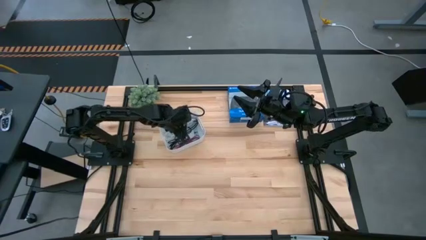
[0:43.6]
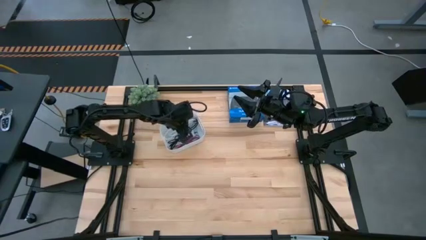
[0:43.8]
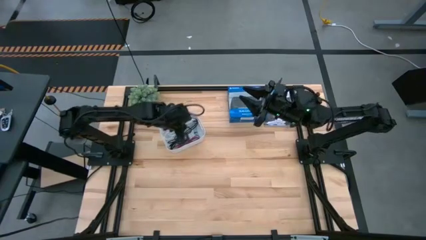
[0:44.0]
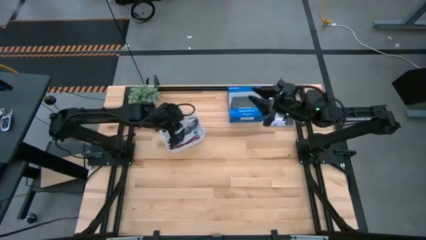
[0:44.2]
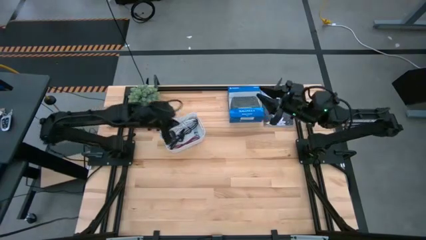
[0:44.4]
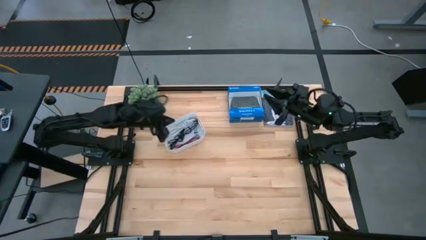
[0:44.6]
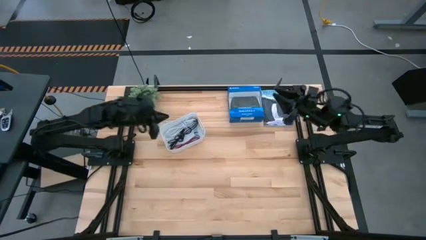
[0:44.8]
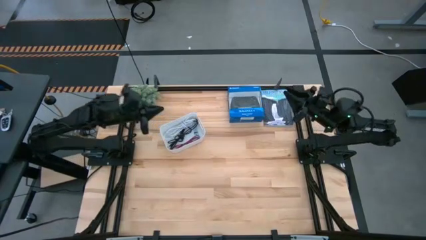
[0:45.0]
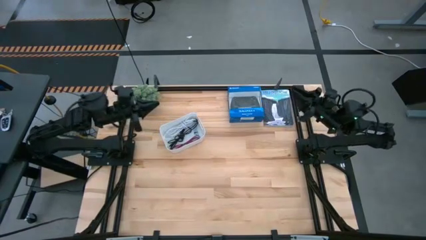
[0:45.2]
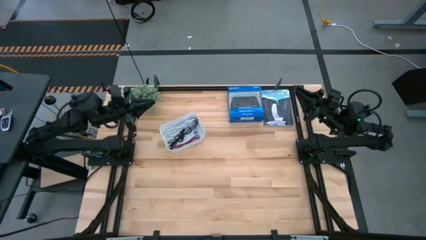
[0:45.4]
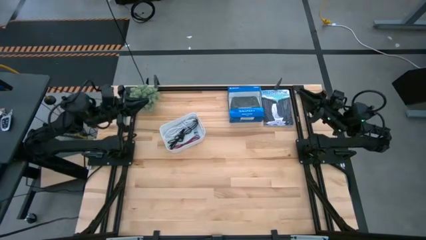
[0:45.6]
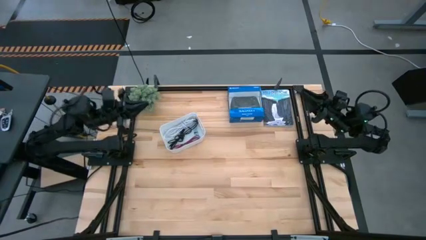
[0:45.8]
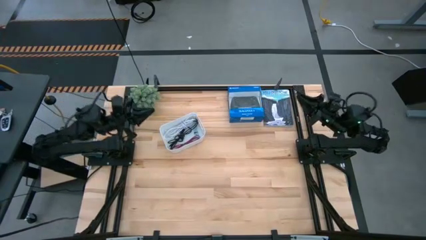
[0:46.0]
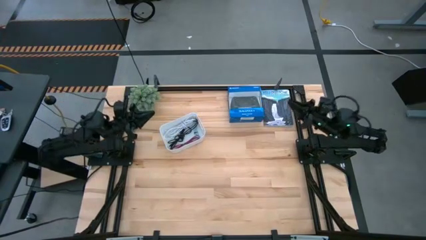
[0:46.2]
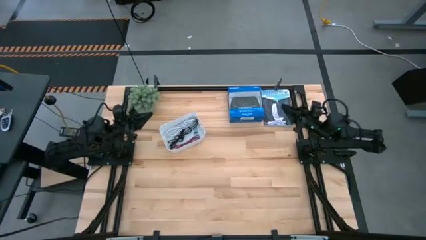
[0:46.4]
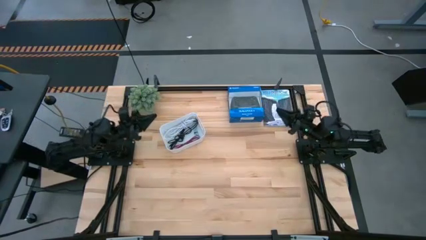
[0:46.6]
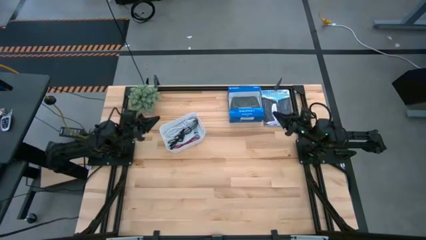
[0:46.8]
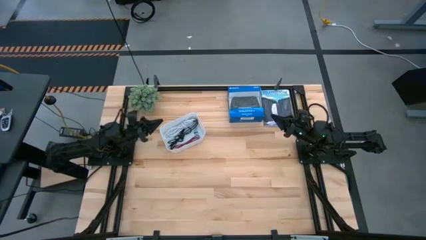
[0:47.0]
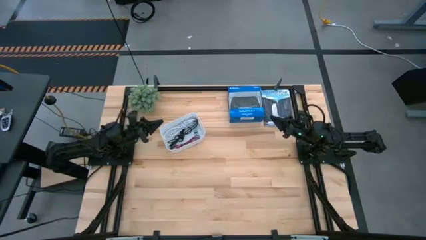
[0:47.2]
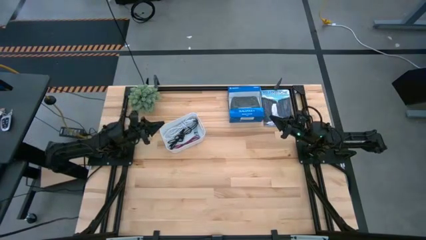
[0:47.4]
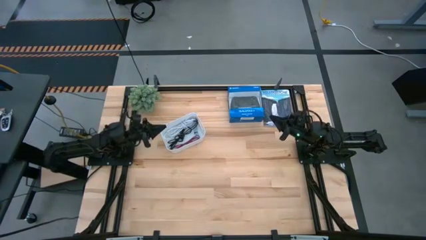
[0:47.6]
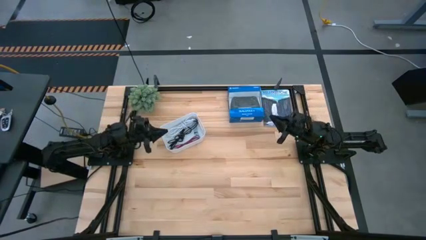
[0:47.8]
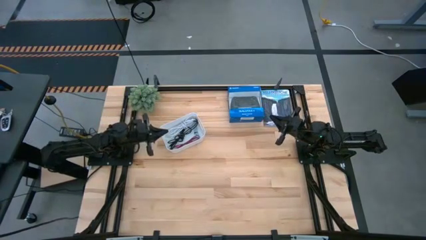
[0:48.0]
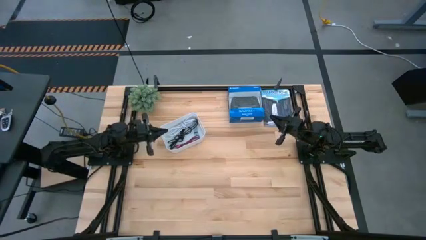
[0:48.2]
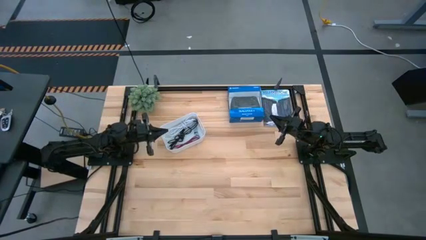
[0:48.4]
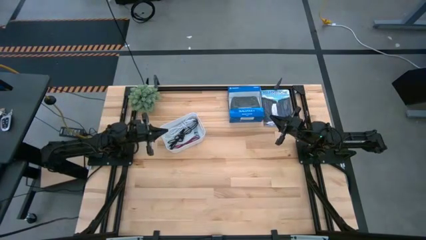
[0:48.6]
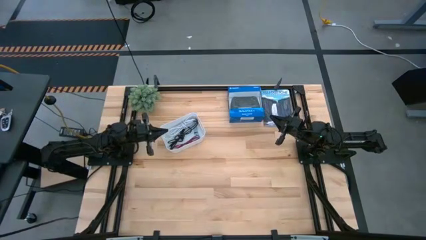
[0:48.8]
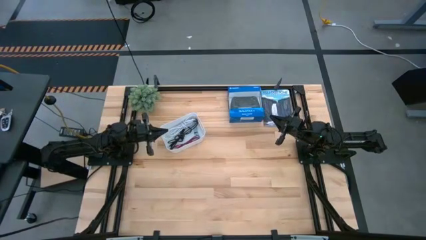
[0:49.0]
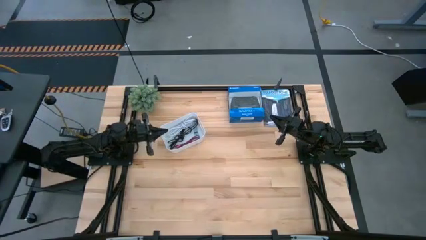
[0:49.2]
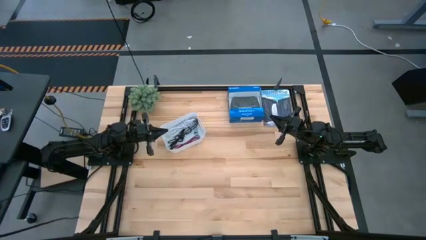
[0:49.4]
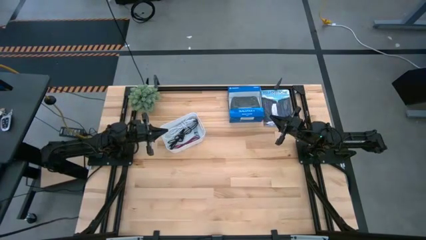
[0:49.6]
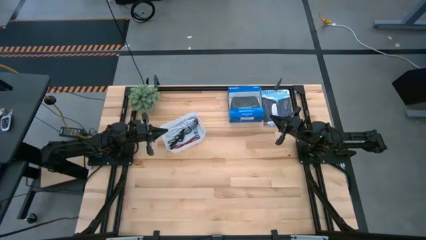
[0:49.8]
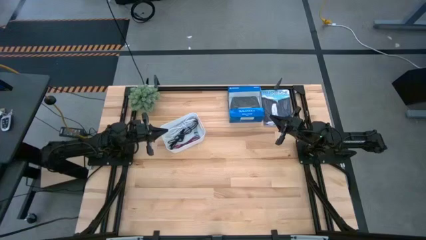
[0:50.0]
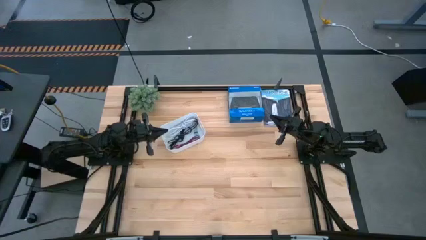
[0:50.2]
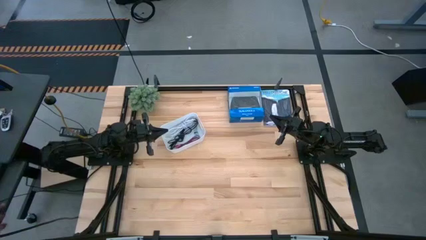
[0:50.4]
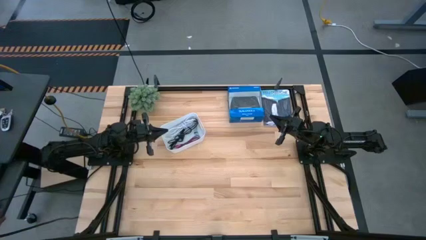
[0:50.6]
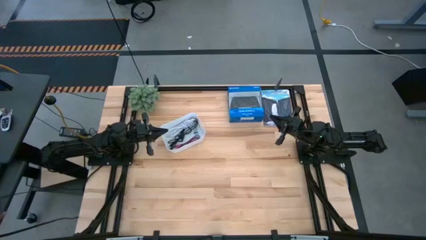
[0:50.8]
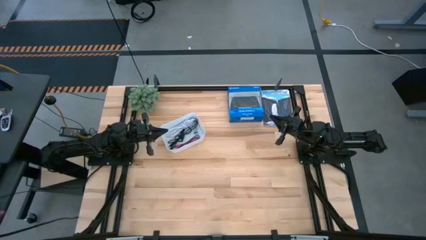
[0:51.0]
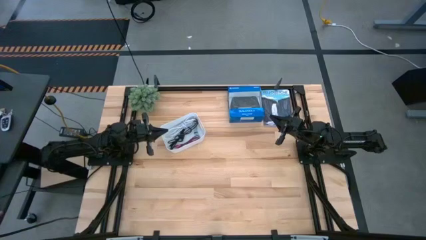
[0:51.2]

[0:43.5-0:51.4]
Task: Pick and place USB-C Cables
Return to Home Position

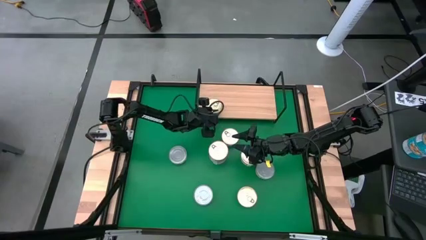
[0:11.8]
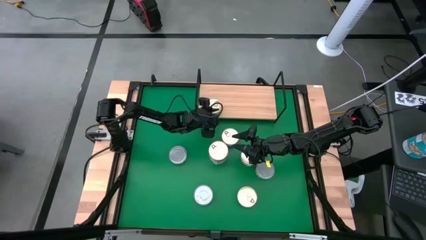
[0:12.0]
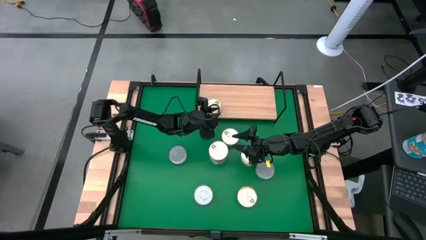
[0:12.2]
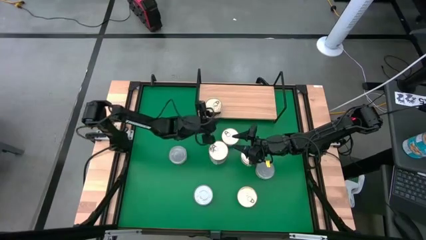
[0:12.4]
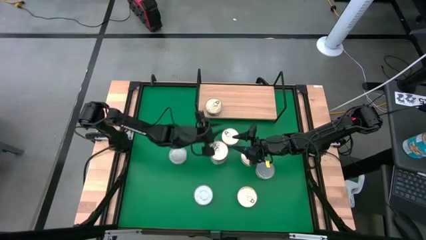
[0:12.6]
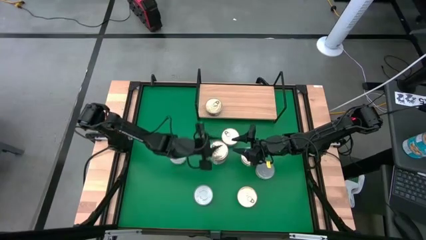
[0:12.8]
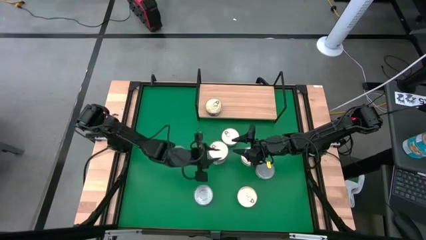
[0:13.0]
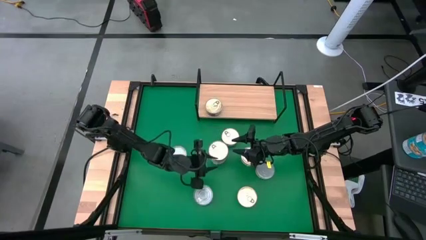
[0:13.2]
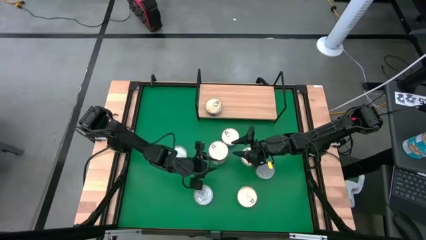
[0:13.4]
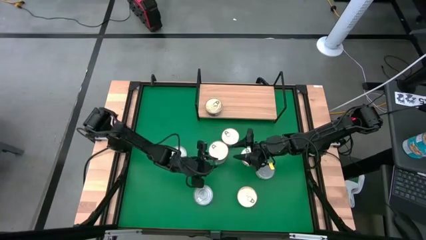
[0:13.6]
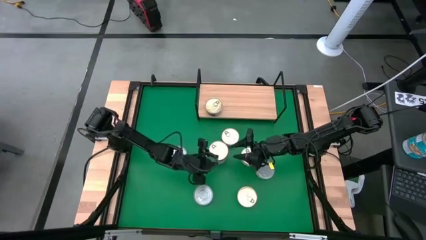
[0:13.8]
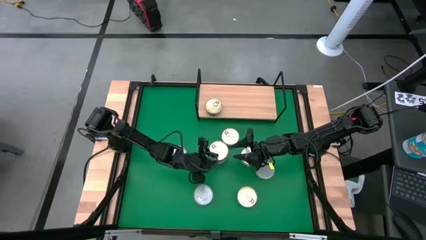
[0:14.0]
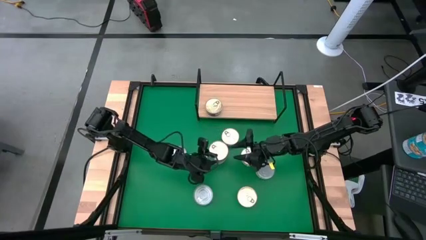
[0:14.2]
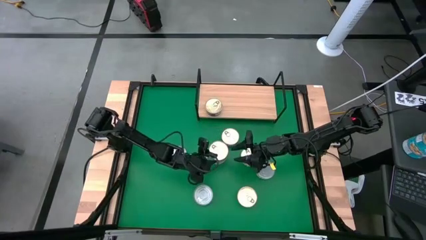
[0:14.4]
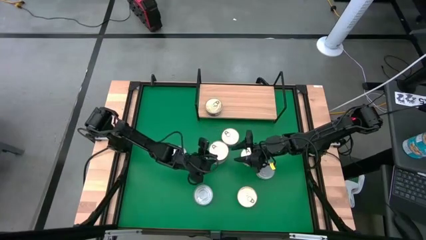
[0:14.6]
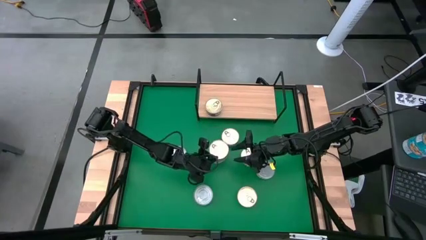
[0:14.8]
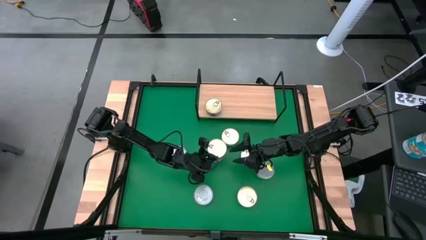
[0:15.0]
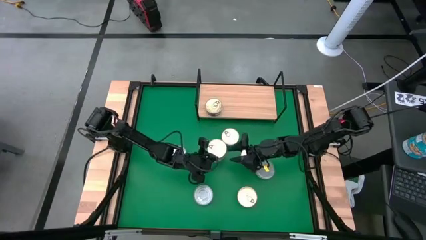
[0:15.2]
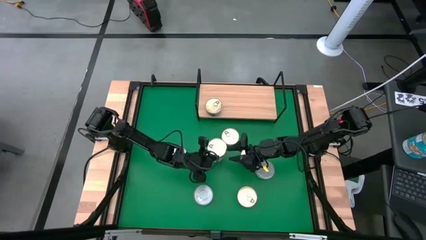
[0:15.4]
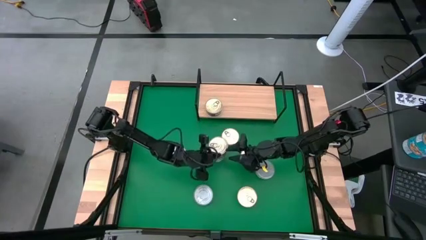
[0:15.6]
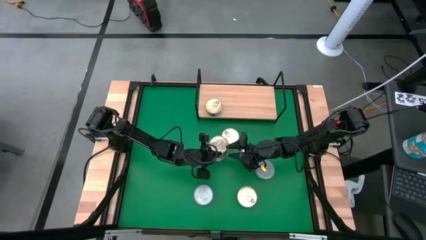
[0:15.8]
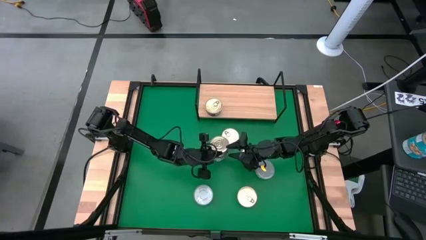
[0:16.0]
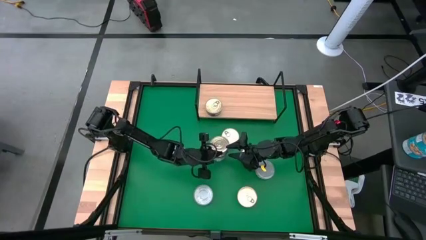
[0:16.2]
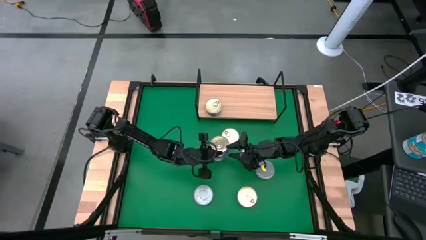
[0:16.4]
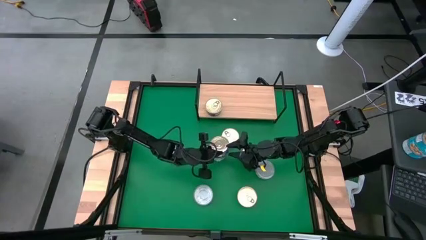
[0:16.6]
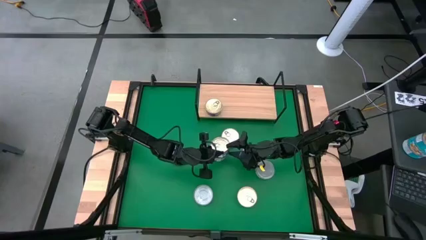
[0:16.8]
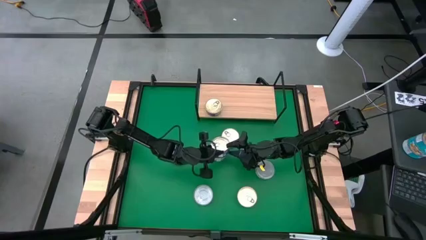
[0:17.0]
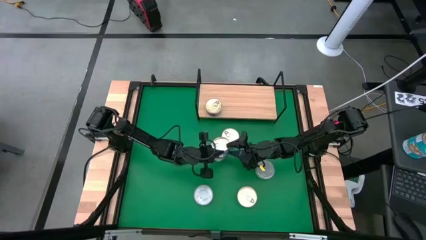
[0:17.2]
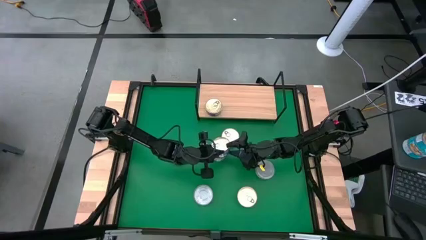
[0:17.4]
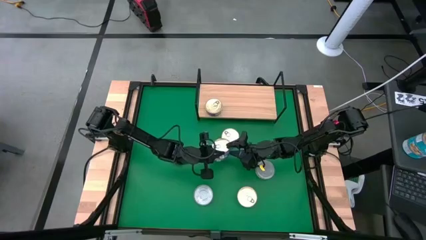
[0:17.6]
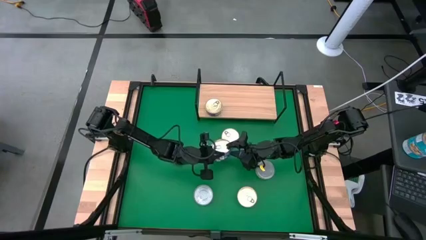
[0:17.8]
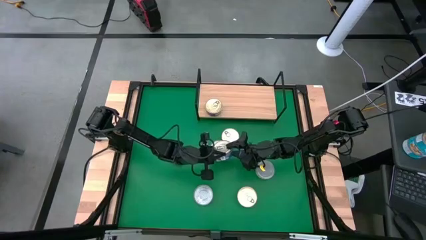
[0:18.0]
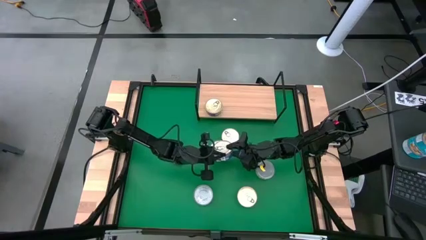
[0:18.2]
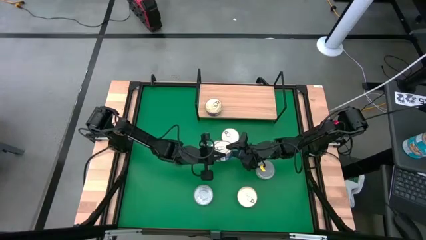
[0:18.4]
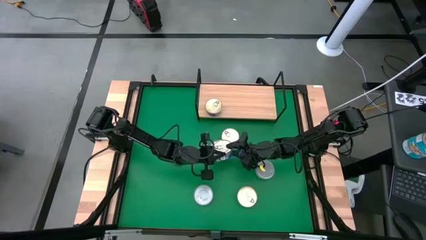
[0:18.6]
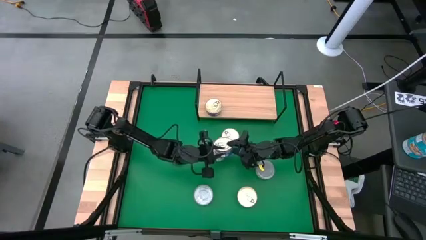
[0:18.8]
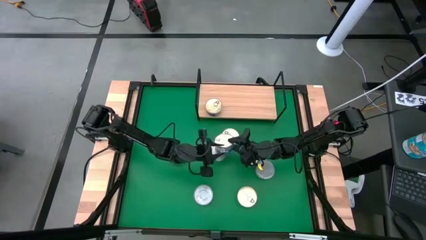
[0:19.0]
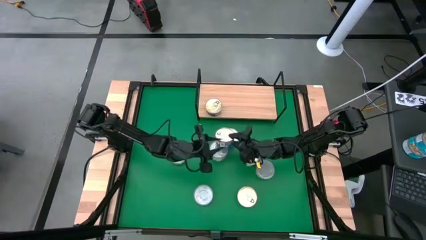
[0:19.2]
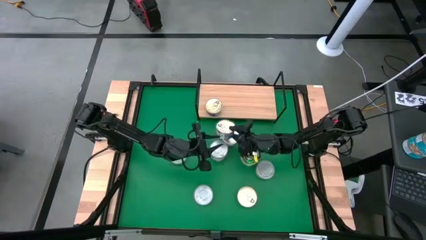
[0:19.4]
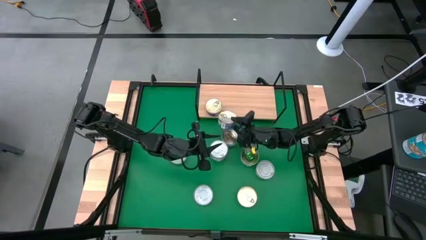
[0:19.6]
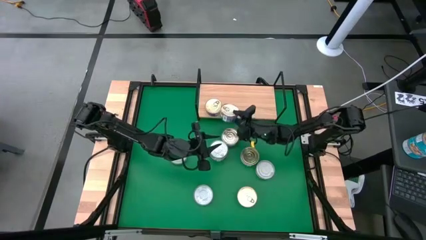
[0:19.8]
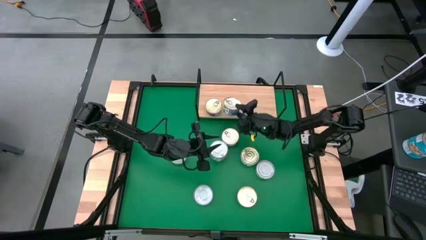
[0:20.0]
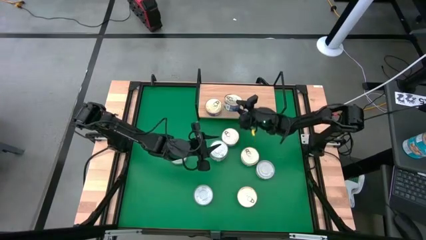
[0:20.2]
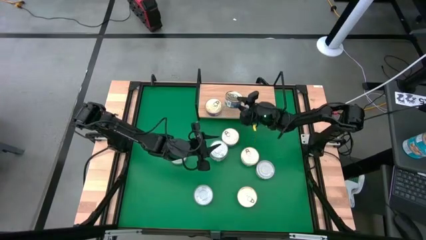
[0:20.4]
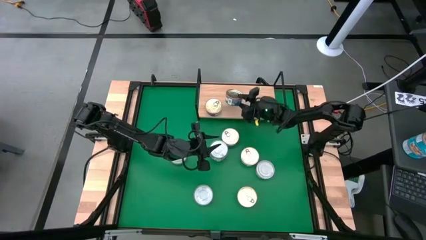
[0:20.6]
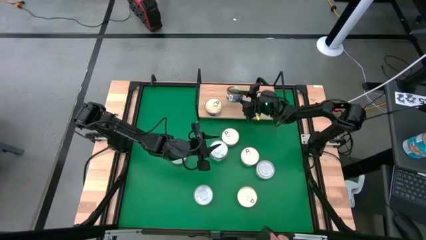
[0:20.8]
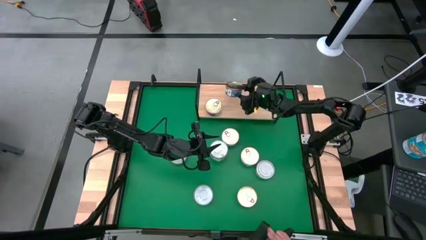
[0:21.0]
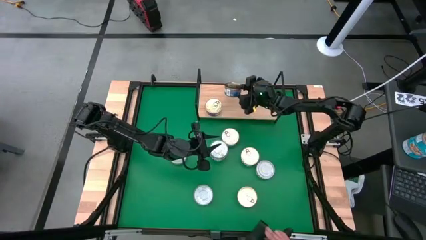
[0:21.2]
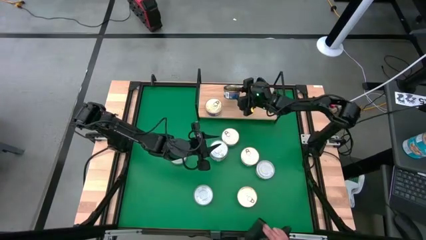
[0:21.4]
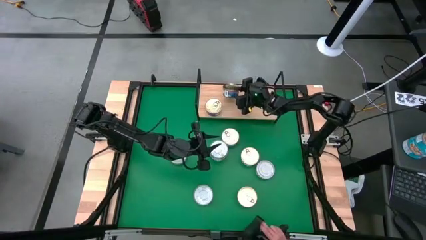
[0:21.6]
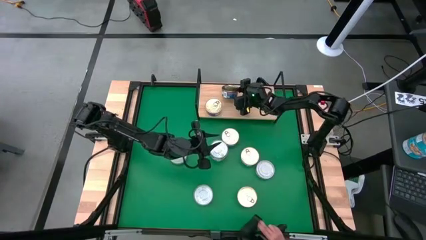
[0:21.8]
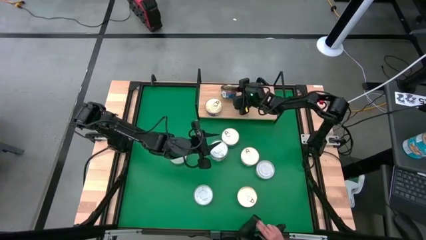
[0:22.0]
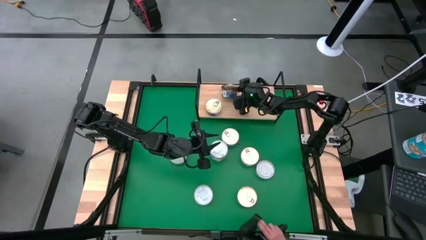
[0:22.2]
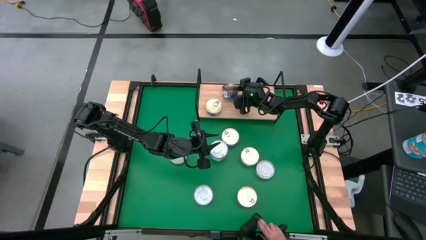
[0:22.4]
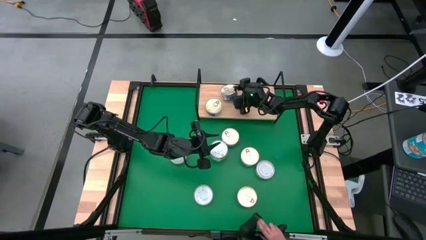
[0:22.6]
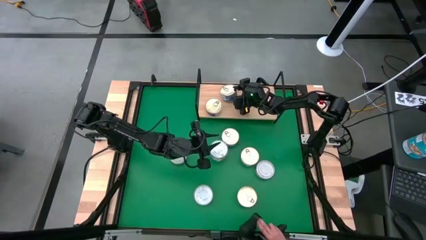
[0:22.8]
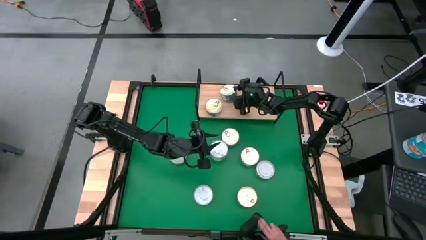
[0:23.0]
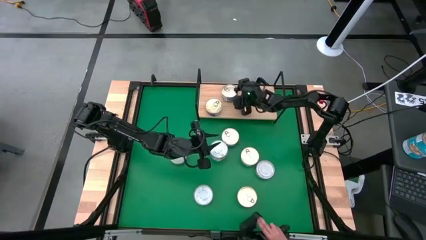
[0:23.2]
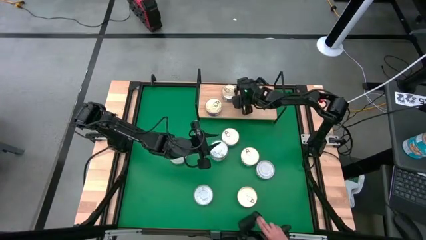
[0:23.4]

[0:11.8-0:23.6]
Task: Stack canned seafood by type on shelf
Put the blue tuna can on the shelf
